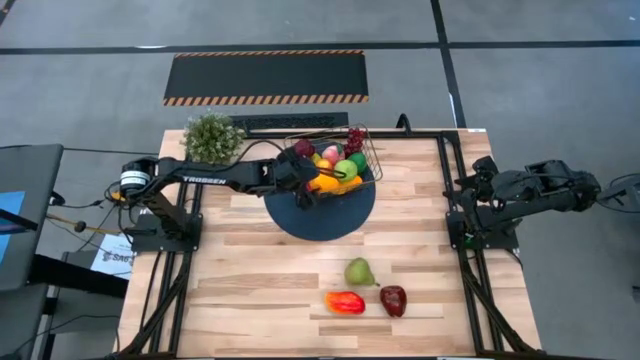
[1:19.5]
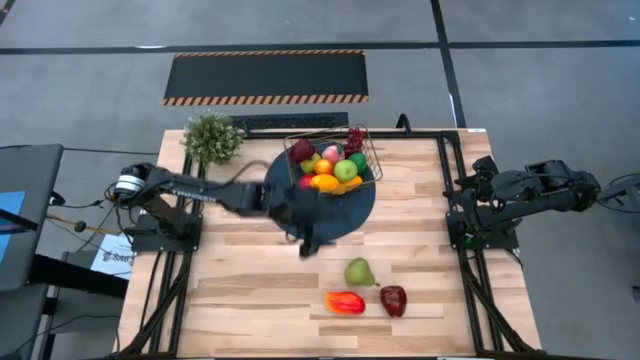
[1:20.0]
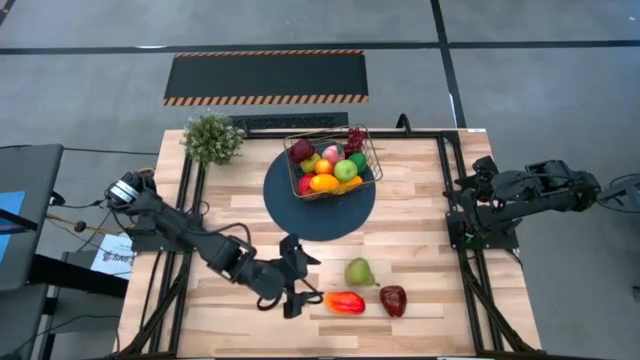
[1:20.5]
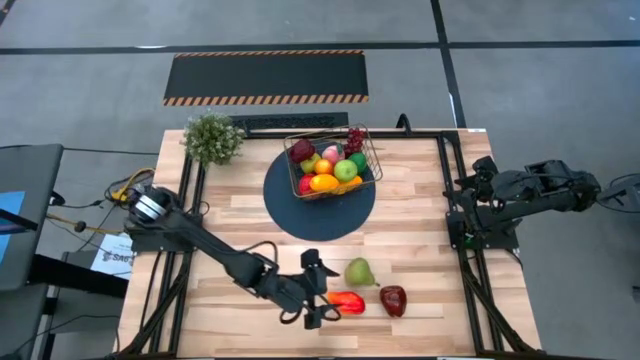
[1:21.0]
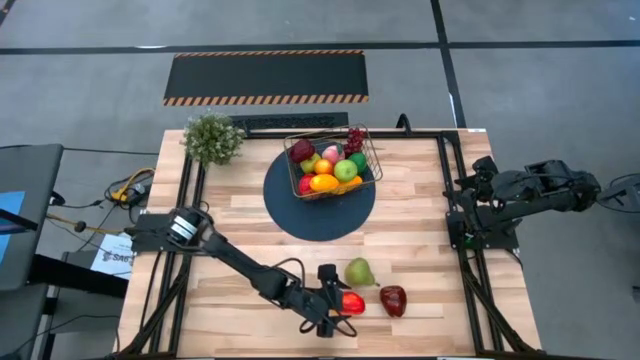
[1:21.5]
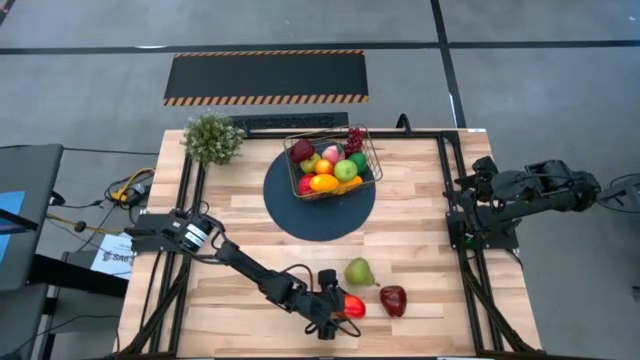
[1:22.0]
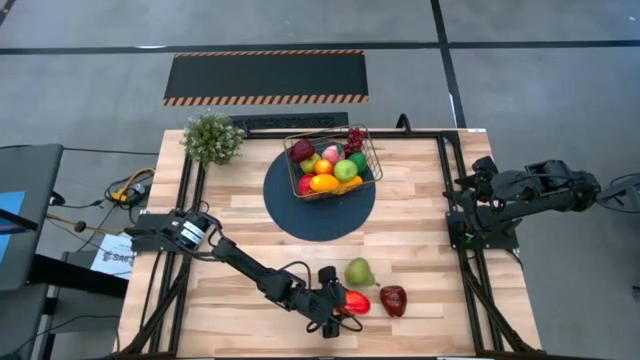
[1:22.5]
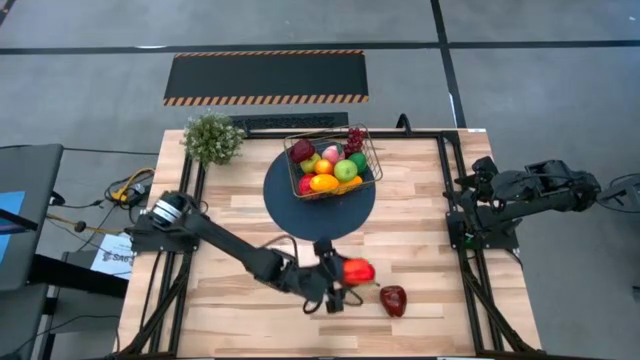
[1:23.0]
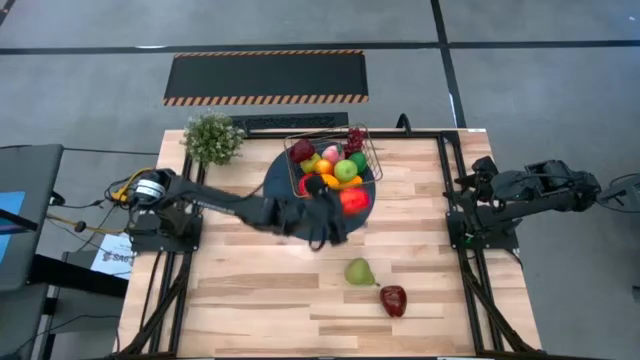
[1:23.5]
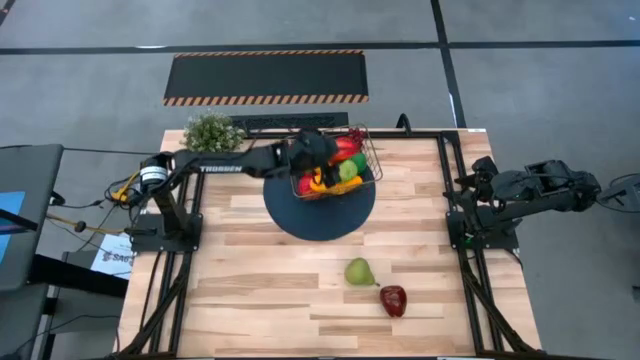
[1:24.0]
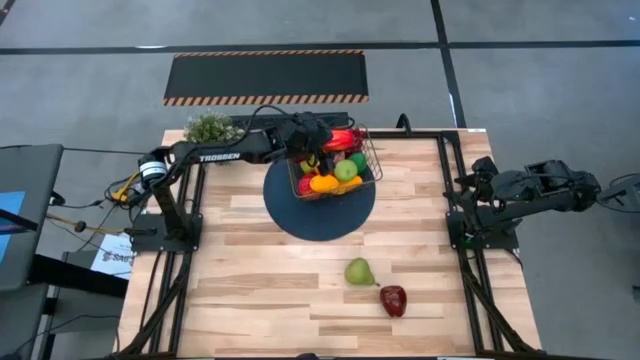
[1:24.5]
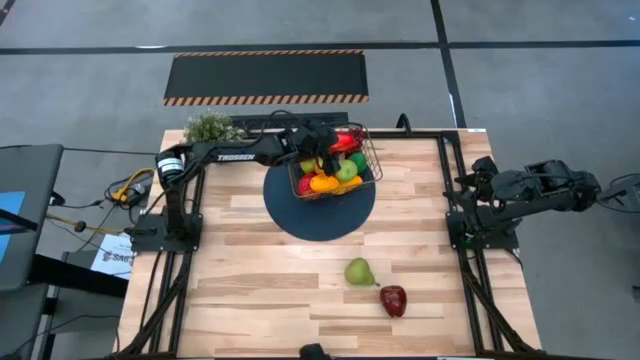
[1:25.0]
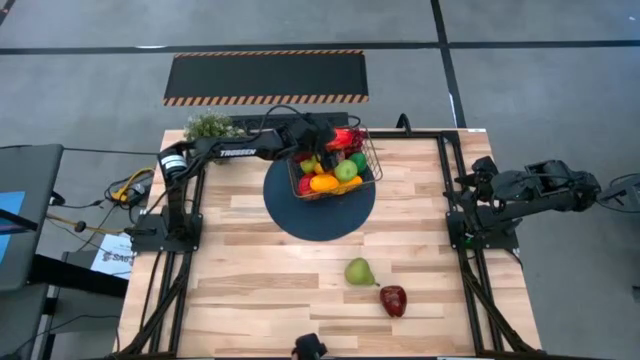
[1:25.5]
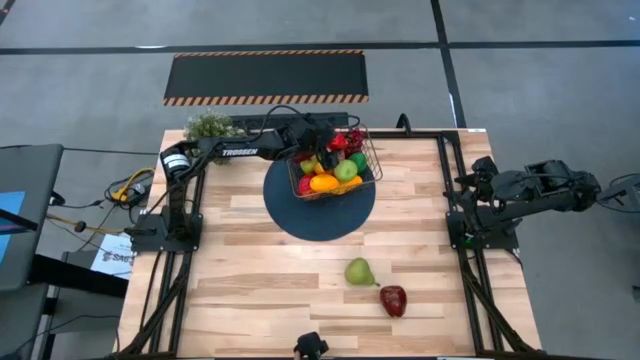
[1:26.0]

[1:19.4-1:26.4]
Task: Build produce basket
Put the orange mango into the wire basket

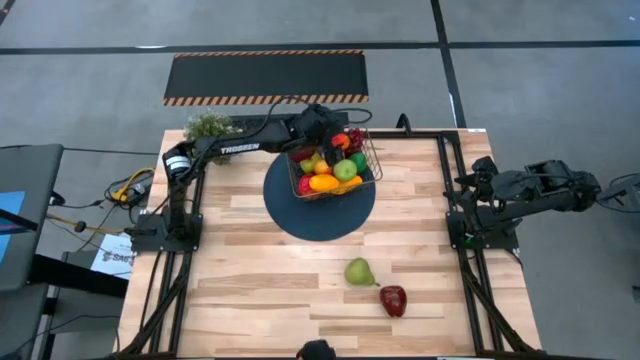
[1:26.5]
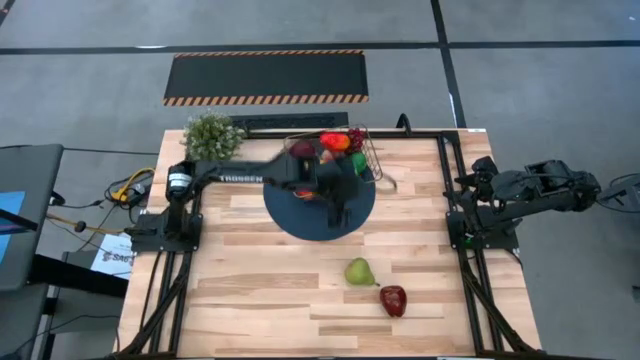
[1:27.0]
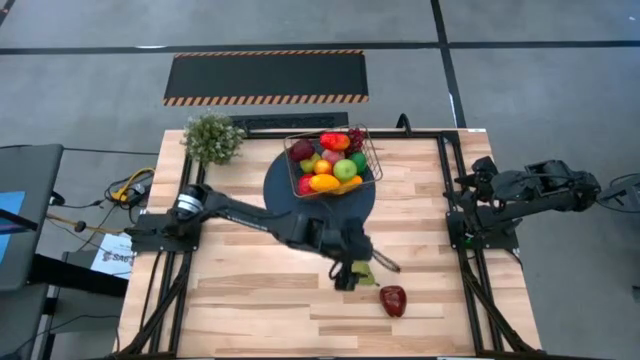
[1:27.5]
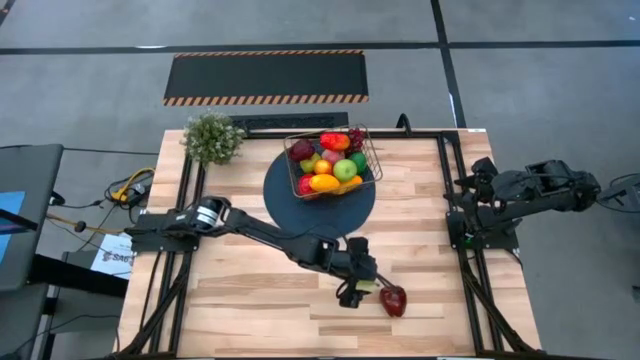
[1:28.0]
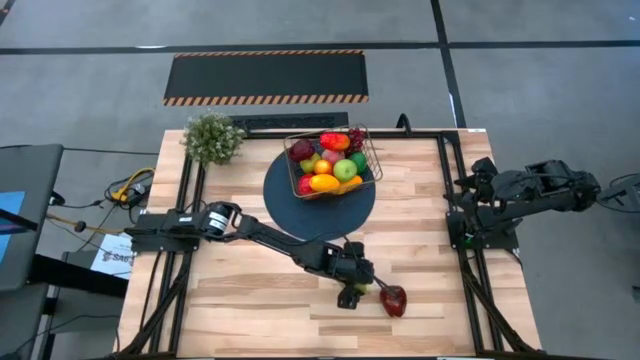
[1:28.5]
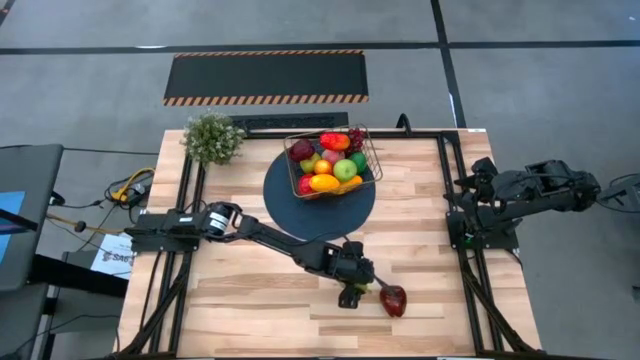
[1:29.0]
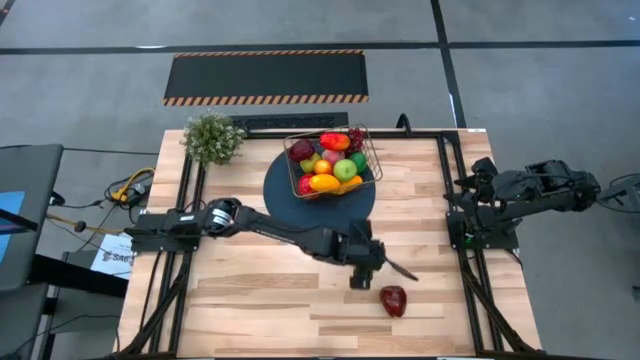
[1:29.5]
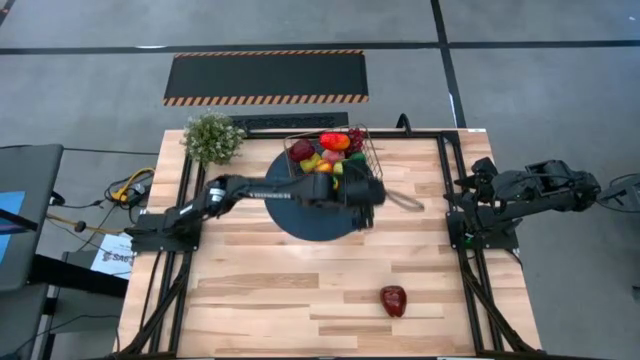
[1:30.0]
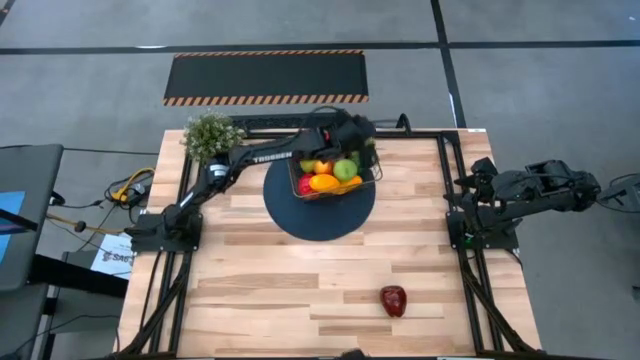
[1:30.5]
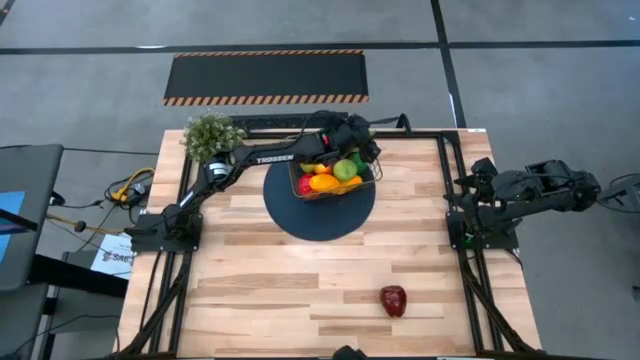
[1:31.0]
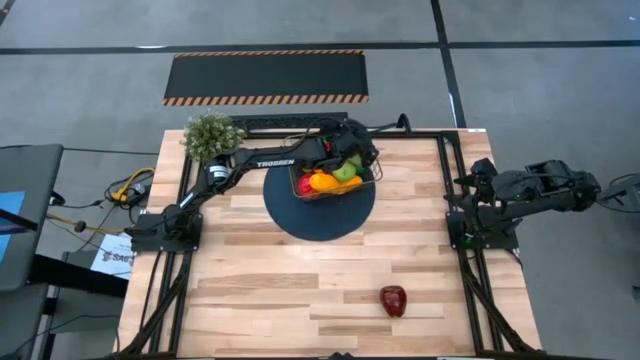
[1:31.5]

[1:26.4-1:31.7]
Put the pear into the wire basket

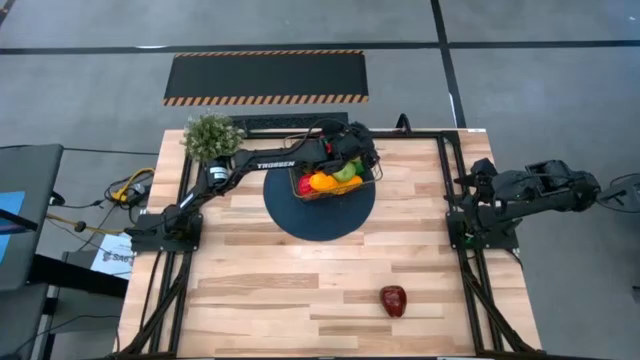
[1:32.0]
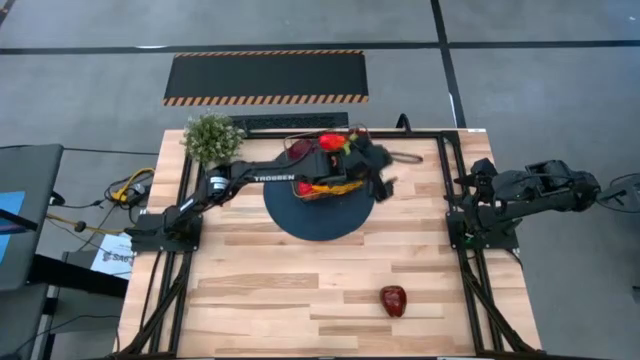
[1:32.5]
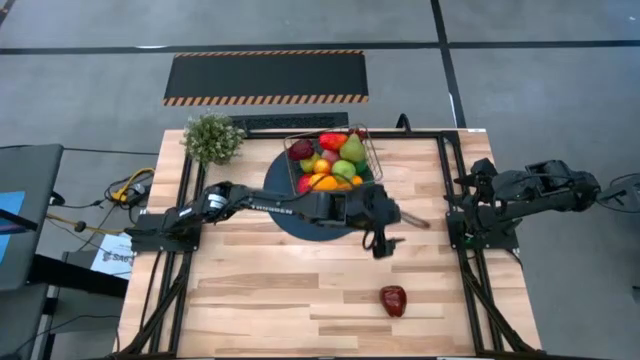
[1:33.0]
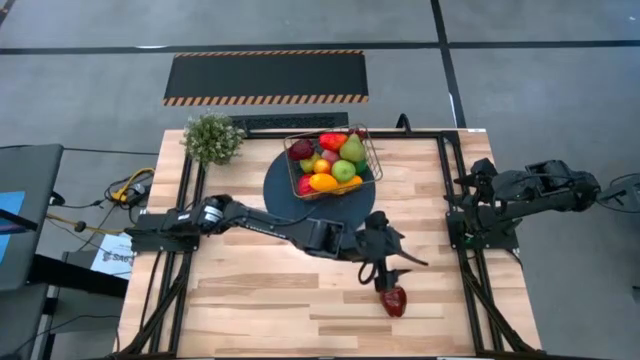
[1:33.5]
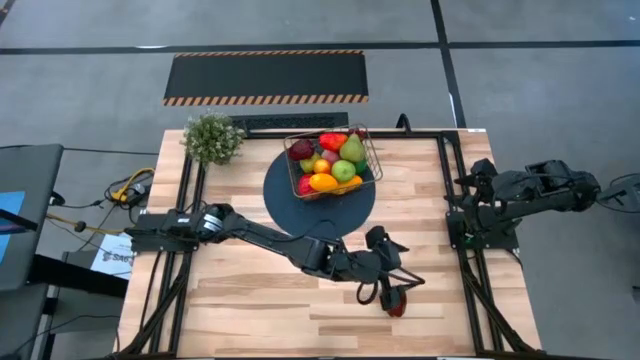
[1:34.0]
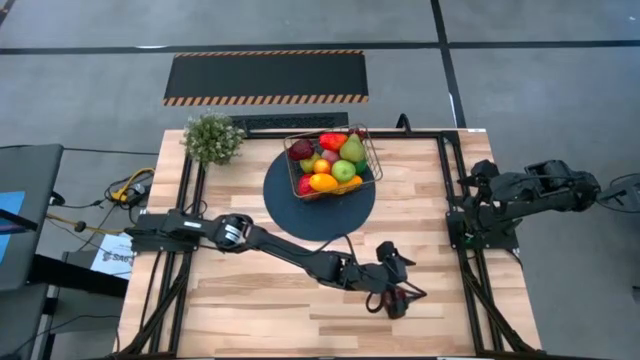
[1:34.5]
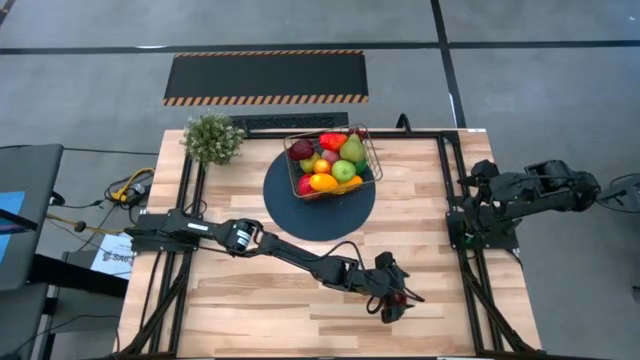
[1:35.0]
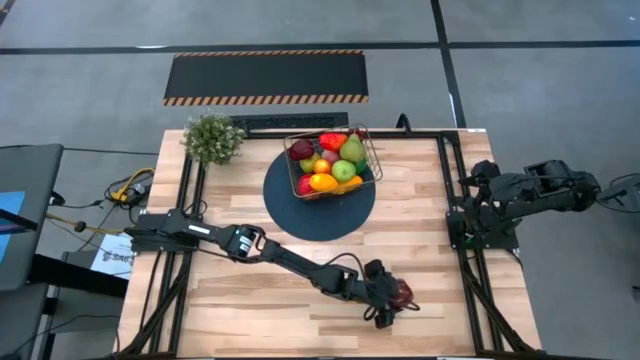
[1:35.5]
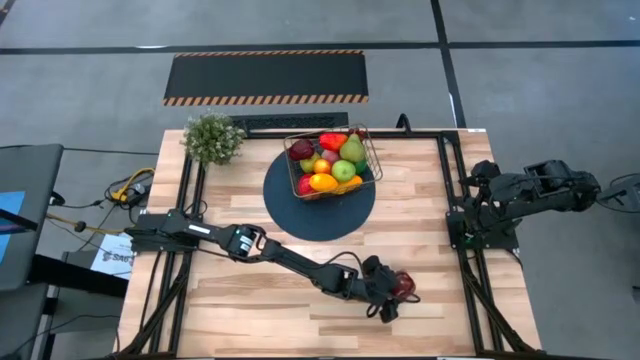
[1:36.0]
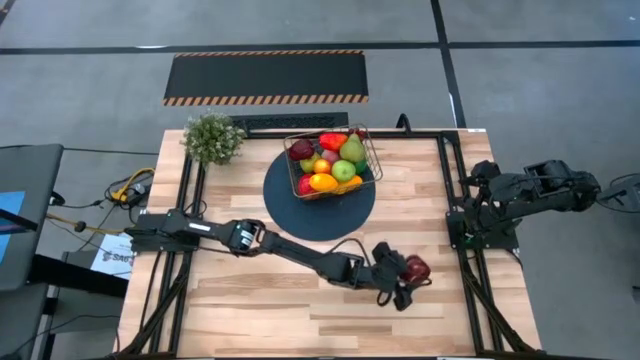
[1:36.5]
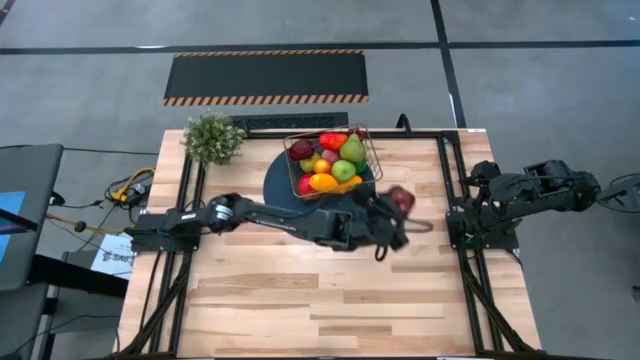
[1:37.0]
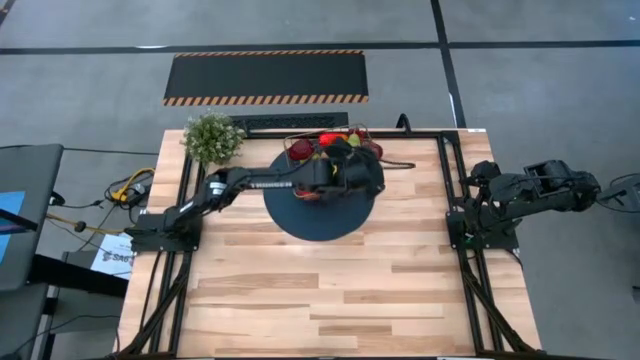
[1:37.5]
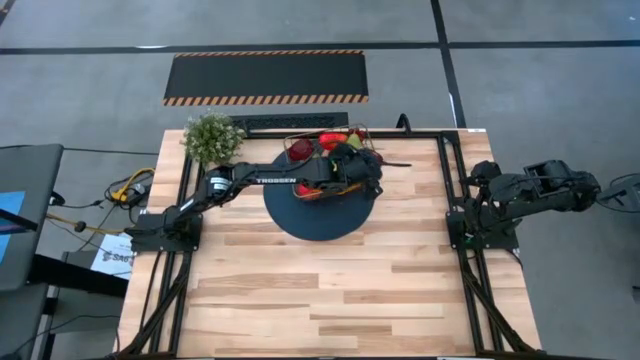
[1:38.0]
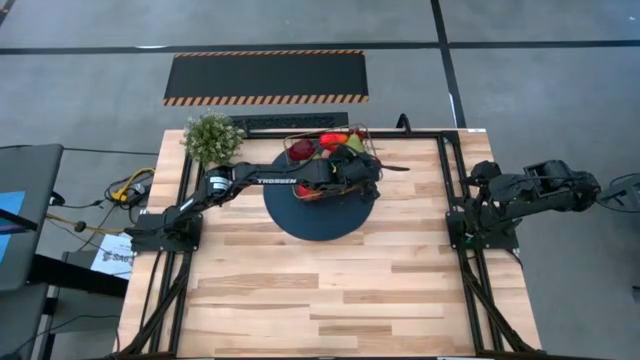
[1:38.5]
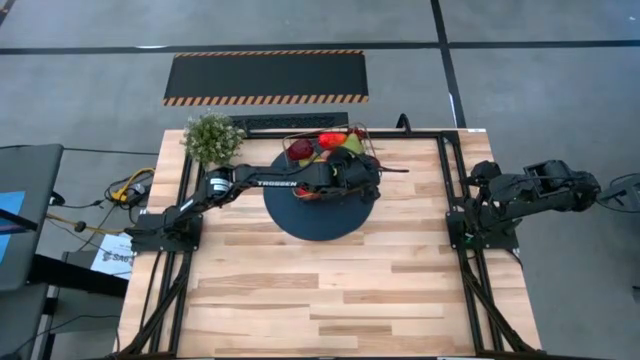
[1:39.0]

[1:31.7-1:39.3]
Put the dark red apple into the wire basket
